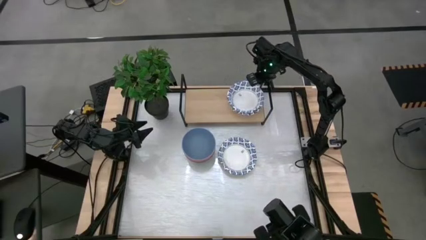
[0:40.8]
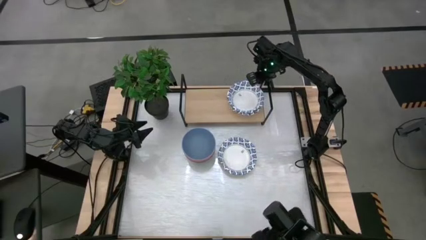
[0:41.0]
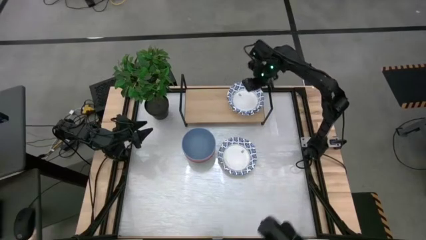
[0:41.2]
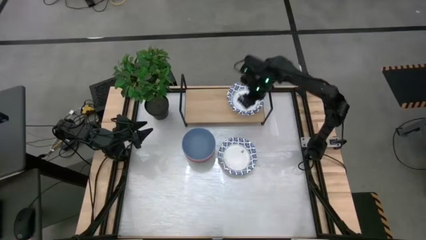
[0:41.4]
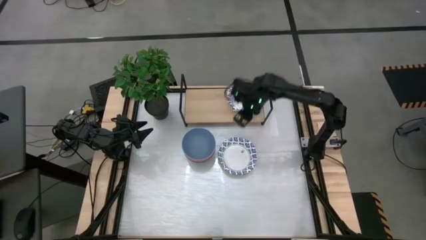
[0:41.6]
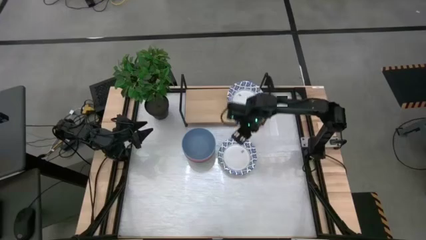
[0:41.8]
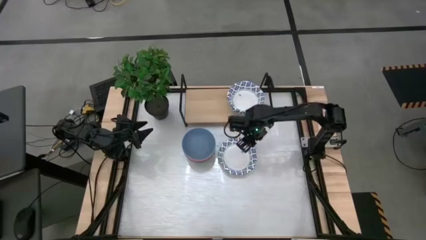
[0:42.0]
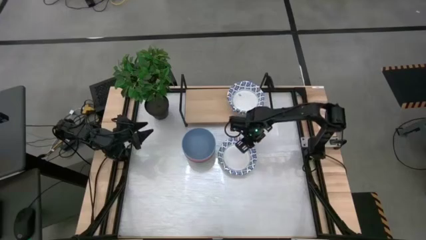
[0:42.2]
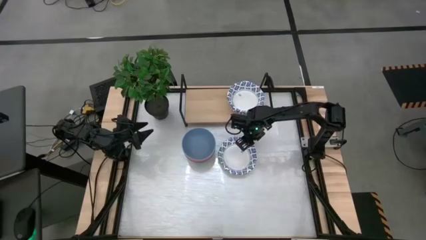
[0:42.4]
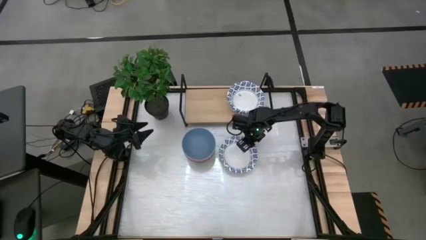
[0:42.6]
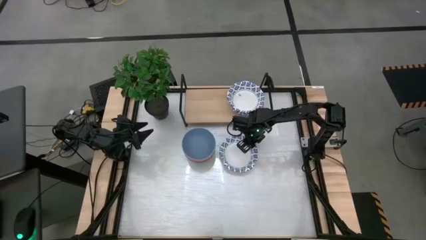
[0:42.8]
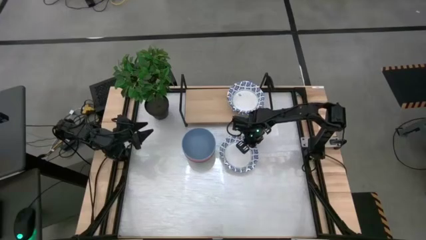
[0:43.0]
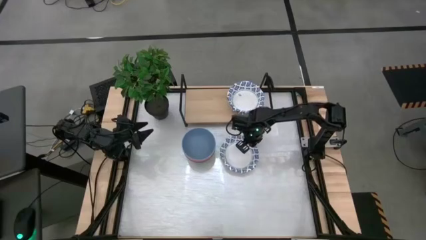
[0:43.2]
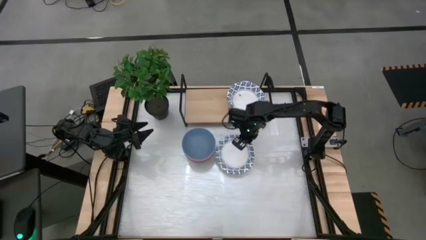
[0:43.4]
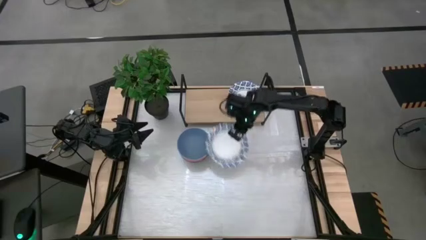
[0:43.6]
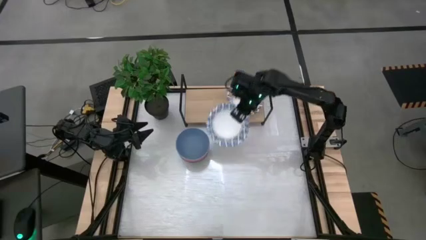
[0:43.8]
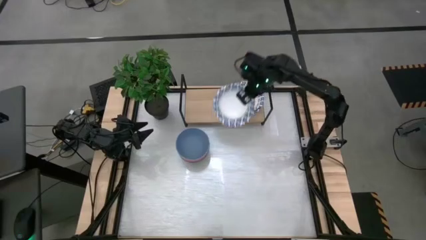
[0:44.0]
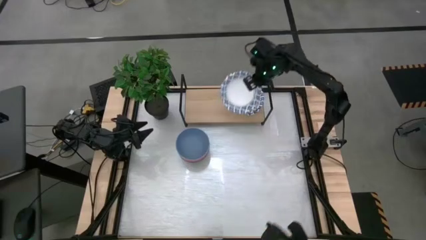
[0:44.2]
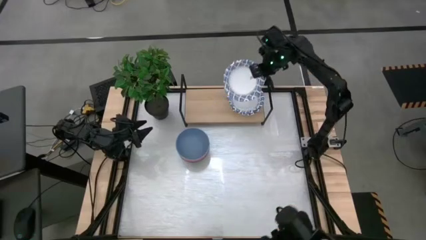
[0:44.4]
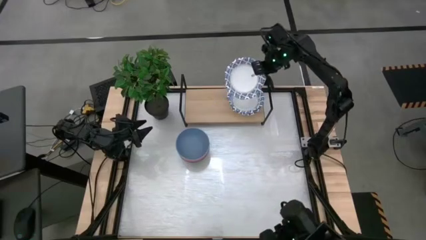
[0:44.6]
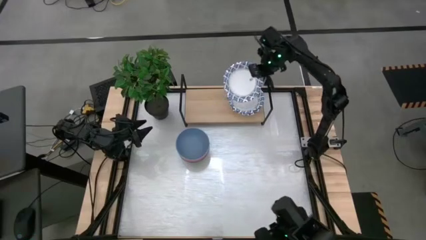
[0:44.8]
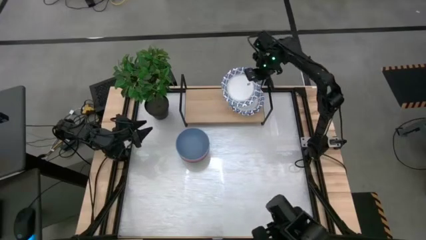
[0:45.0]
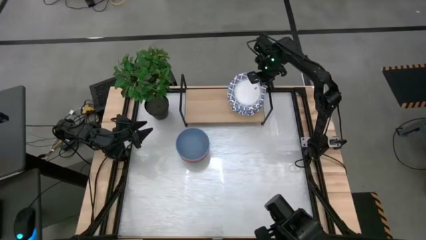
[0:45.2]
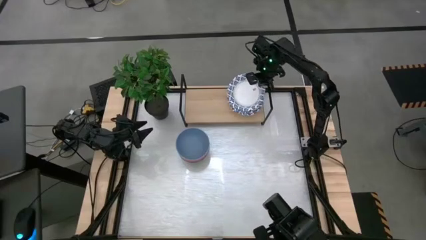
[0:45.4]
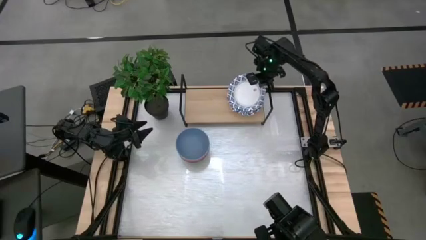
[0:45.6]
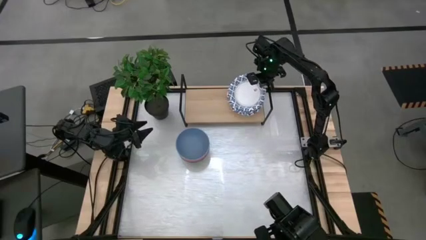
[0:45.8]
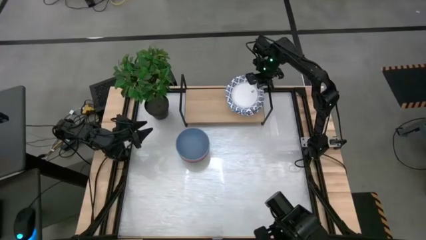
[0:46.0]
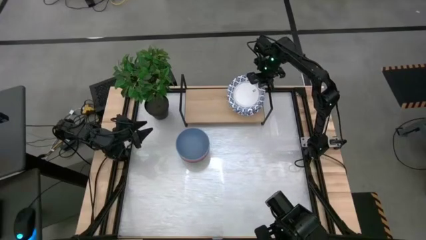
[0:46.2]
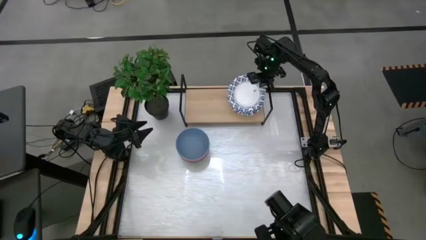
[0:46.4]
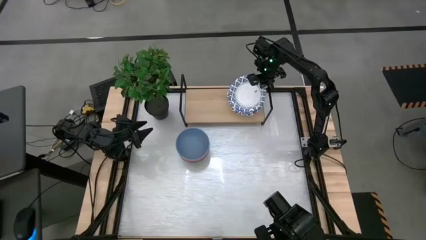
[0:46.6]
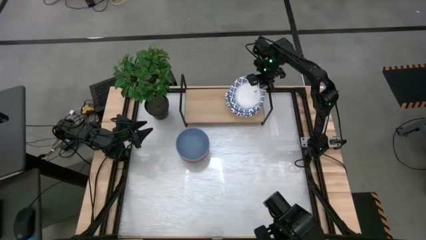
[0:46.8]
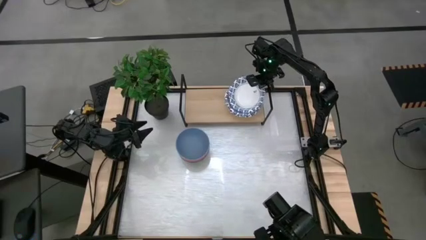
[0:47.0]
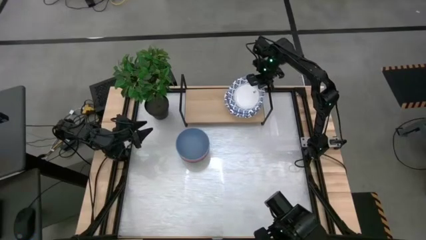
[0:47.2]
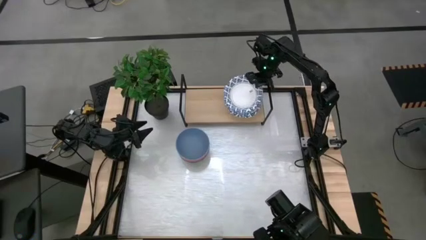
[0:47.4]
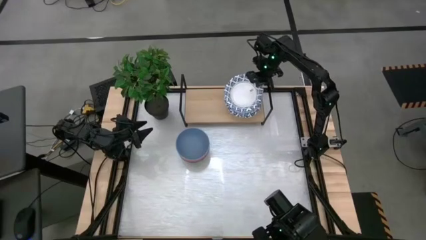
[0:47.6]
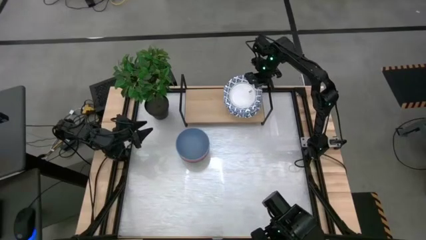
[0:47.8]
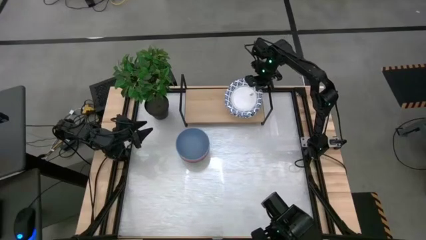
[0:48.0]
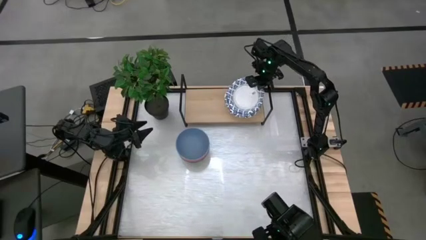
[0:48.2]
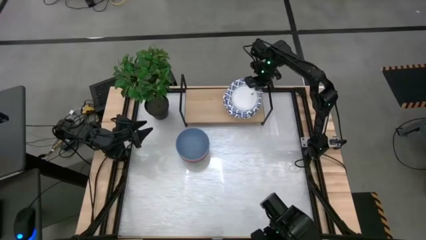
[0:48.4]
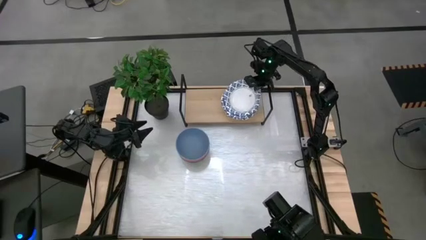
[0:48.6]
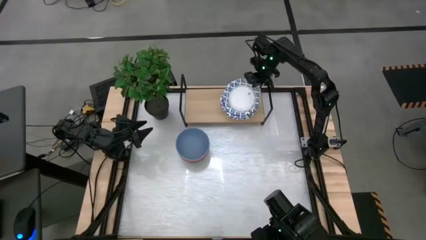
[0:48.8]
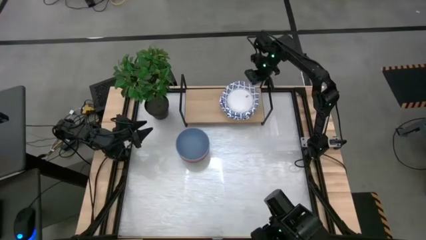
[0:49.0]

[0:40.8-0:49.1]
Task: Place and stack bowls onto a shelf
Stack the blue patterned bowl on top of the blue patterned bowl on the shelf

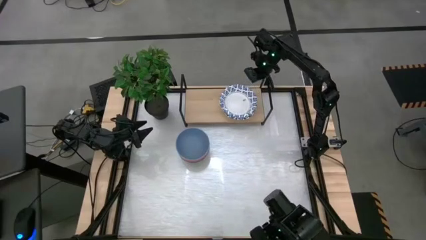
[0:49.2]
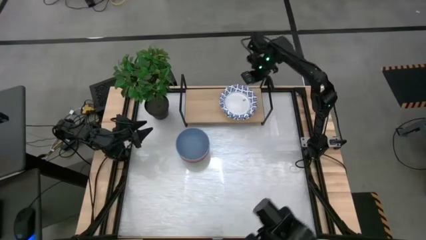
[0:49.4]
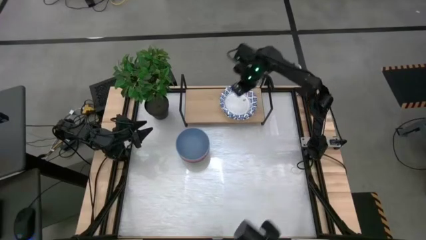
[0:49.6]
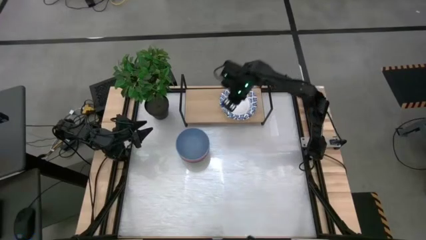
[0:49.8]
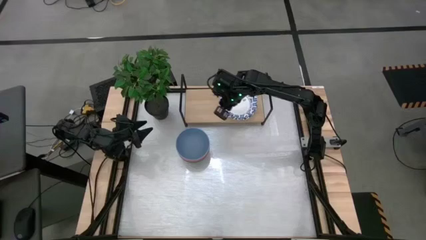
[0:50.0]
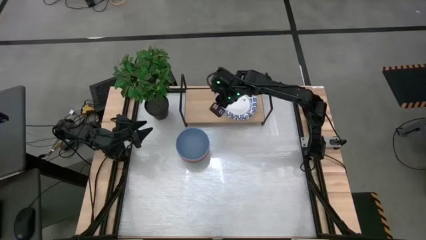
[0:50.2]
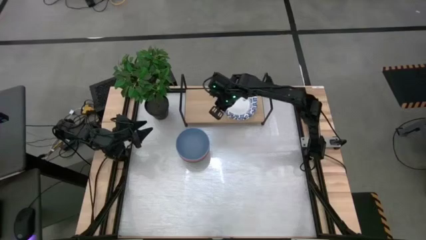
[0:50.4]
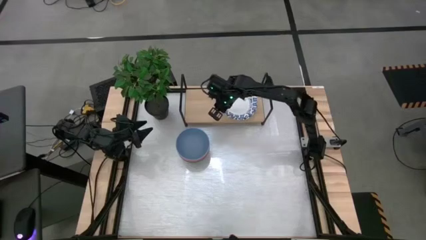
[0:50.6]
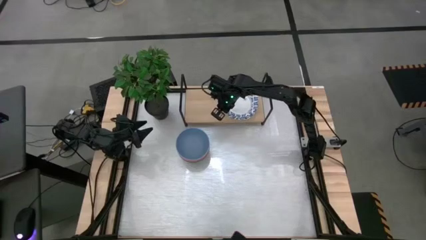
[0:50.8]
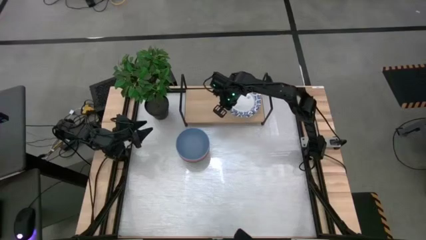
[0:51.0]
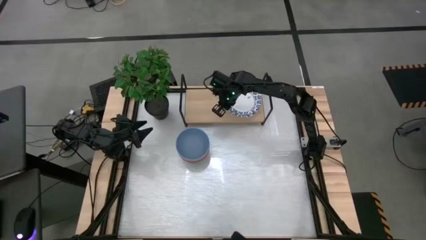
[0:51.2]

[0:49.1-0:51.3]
Adjust the stack of blue patterned bowls on the shelf

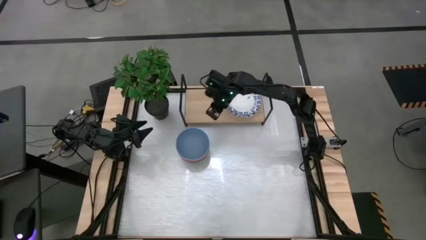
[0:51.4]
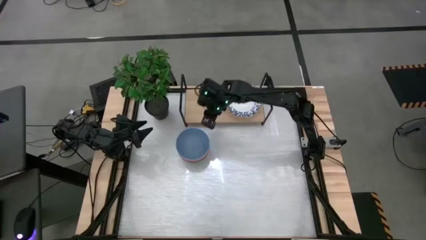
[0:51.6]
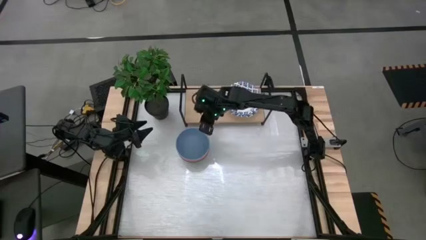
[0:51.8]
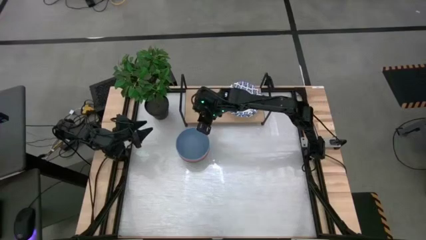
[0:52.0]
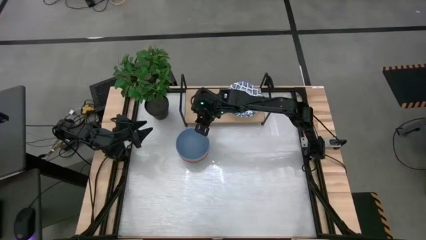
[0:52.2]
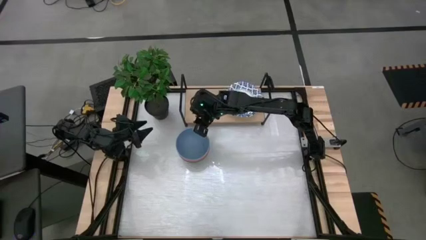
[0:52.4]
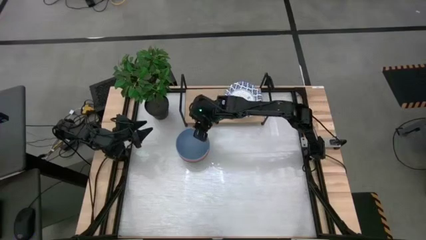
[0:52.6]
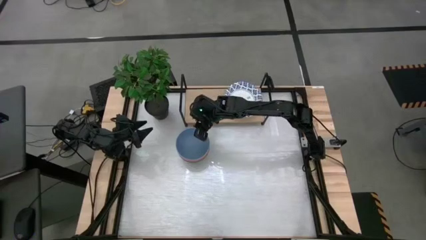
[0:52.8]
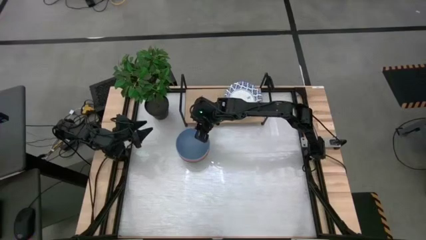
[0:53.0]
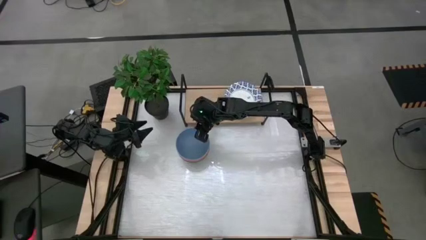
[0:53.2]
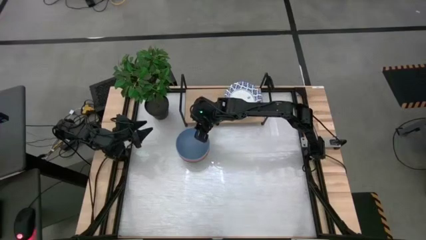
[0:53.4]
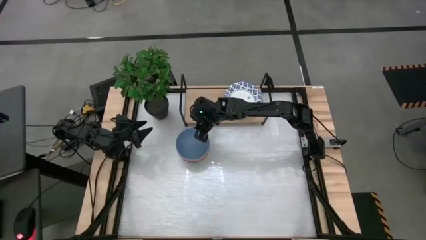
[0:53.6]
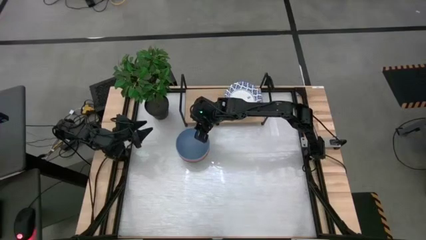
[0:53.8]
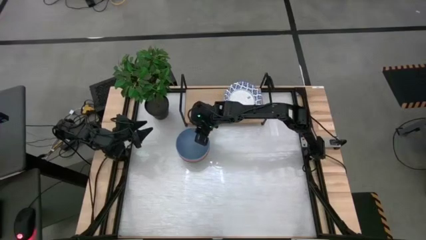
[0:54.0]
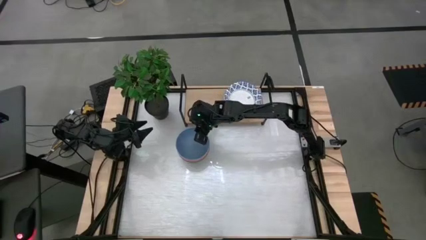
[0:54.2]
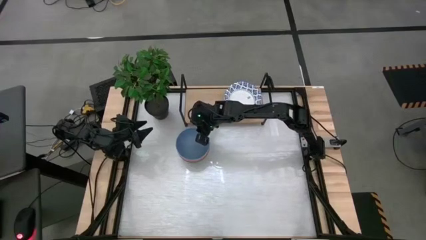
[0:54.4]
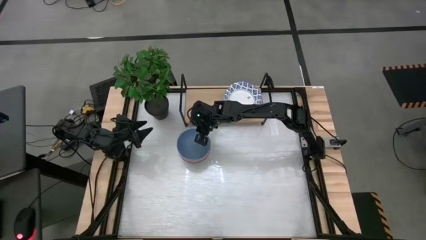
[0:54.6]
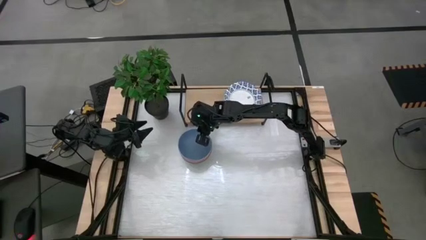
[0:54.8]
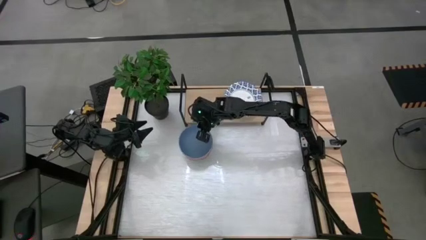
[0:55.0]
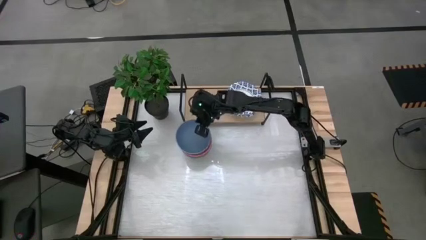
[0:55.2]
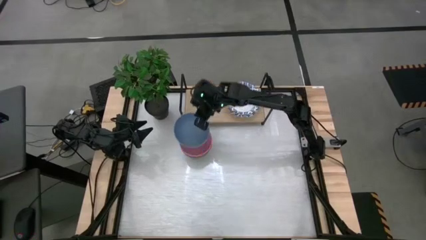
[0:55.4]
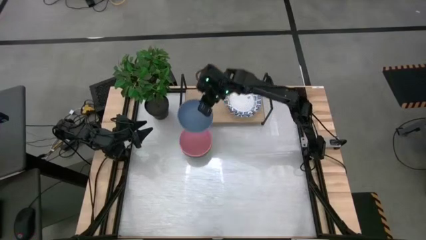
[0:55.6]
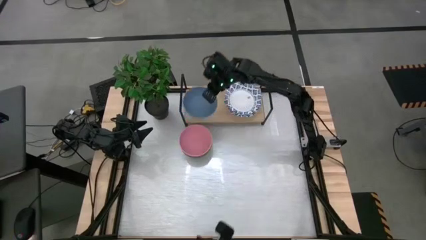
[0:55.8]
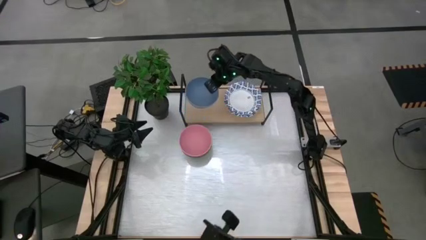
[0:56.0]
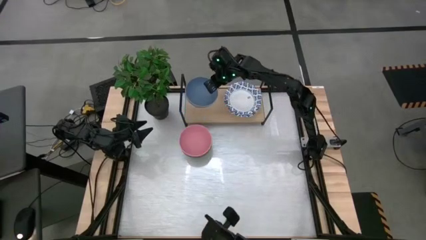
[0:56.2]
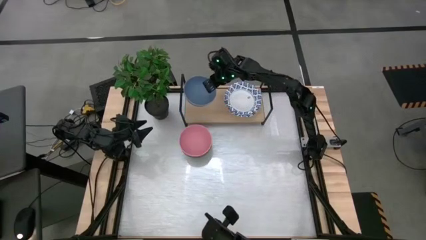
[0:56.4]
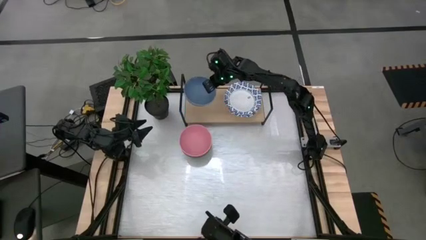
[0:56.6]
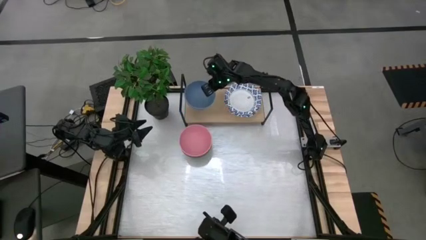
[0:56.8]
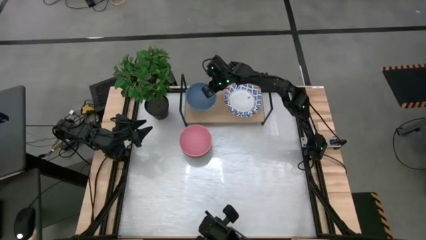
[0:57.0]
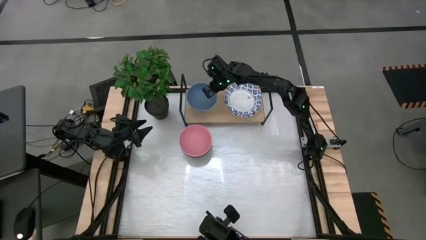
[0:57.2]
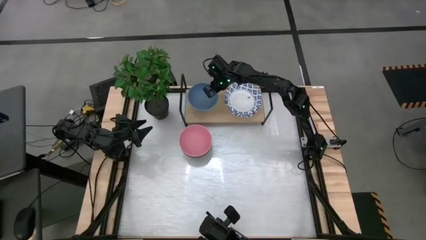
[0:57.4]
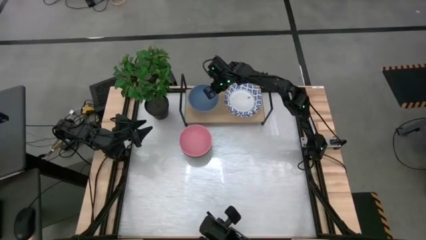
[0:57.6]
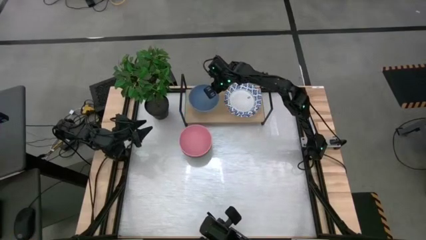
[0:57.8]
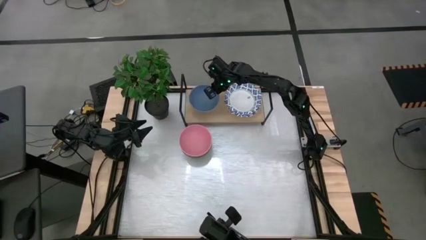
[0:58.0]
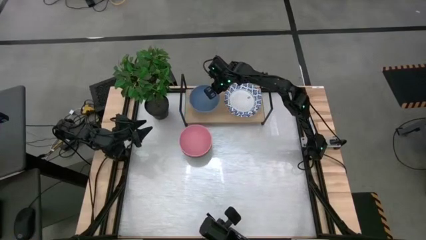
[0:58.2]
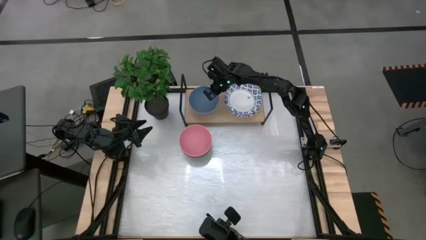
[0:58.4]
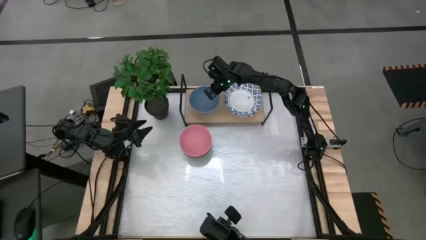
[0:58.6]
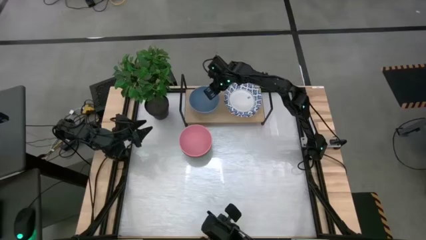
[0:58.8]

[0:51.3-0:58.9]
Put the blue bowl on the shelf
